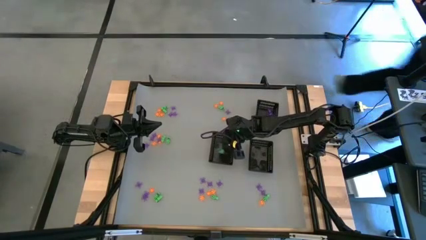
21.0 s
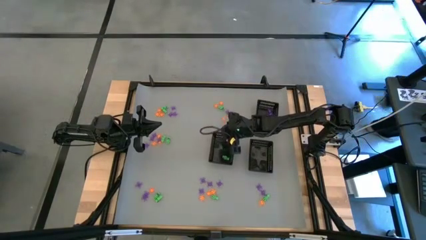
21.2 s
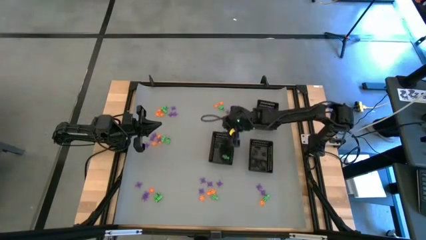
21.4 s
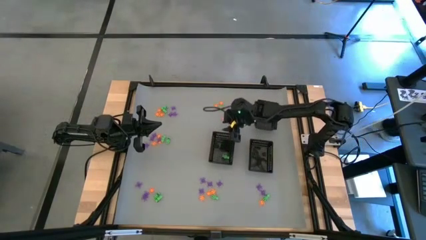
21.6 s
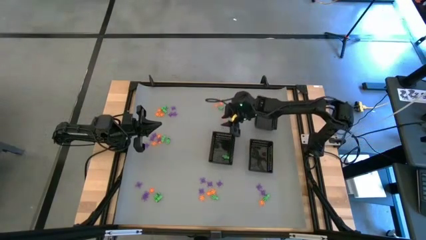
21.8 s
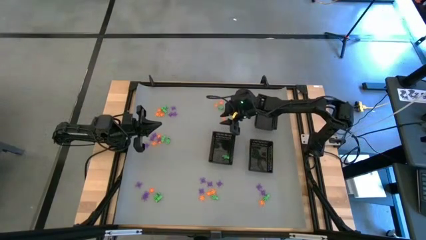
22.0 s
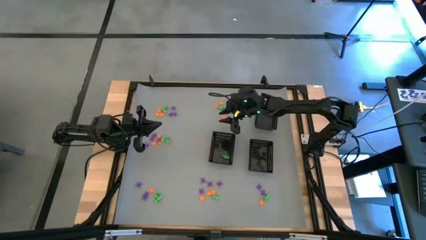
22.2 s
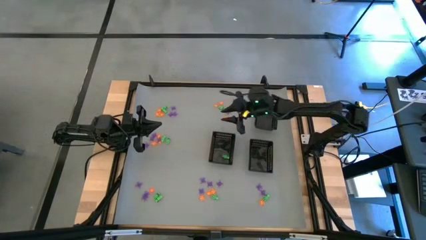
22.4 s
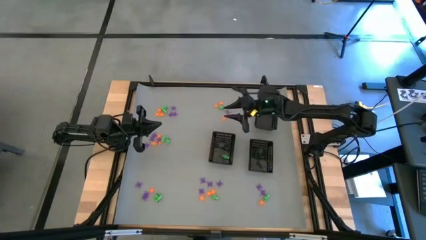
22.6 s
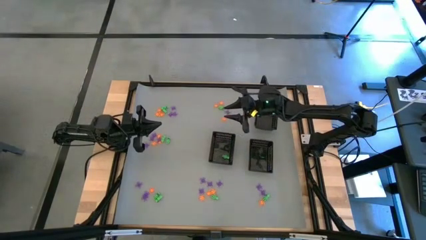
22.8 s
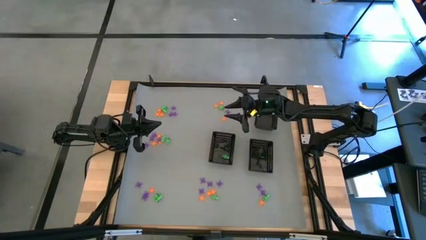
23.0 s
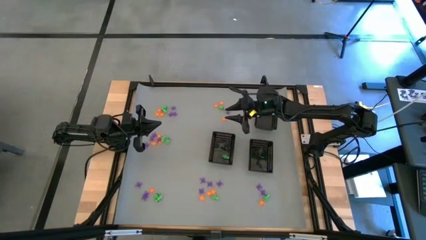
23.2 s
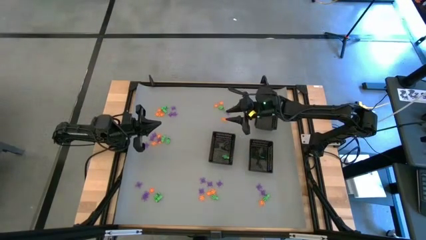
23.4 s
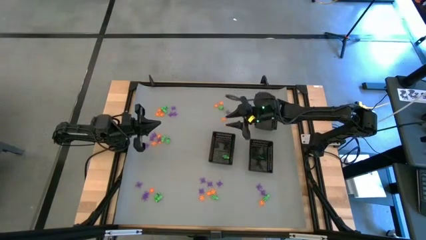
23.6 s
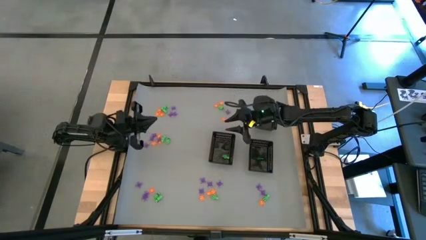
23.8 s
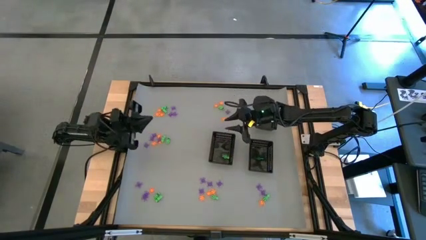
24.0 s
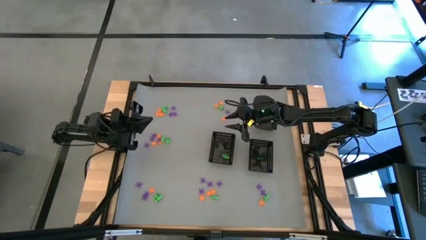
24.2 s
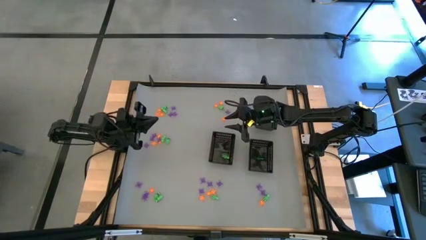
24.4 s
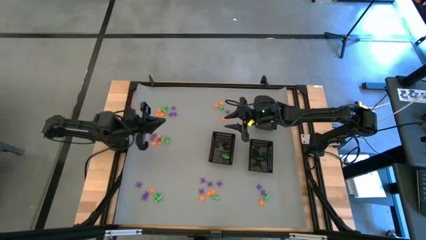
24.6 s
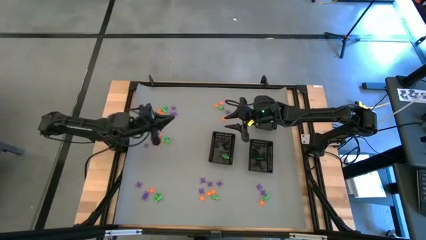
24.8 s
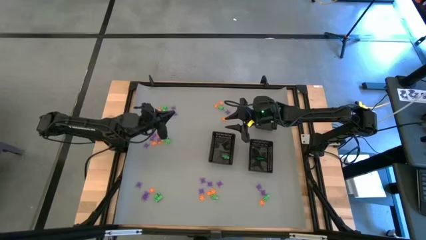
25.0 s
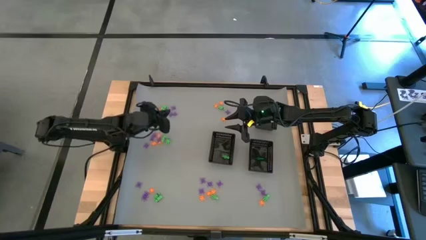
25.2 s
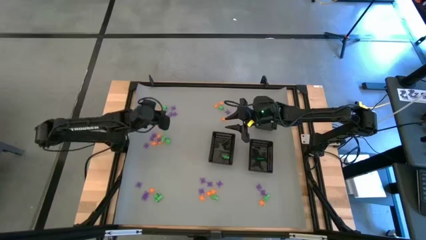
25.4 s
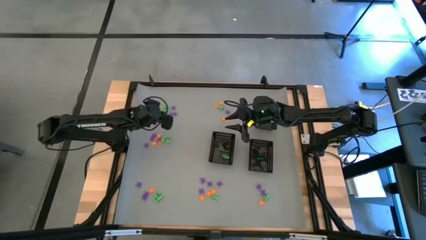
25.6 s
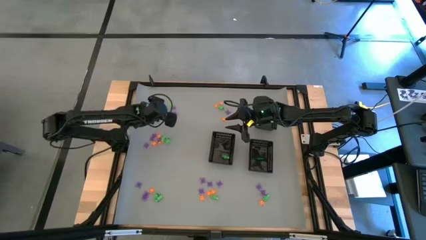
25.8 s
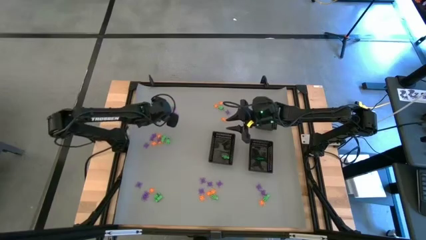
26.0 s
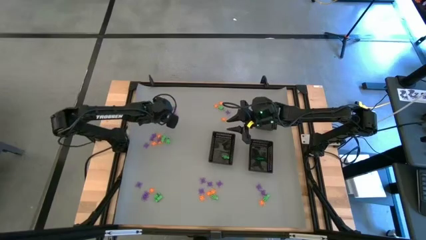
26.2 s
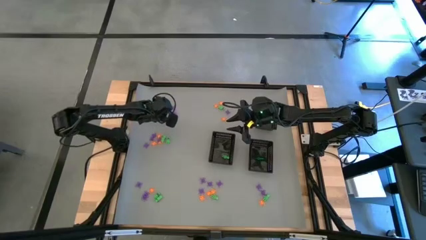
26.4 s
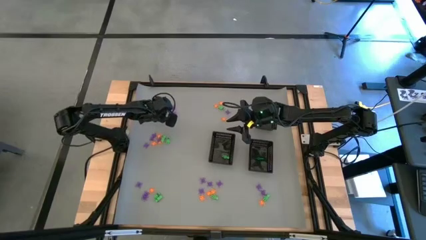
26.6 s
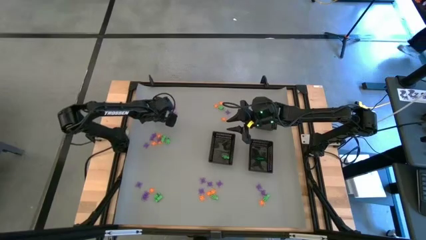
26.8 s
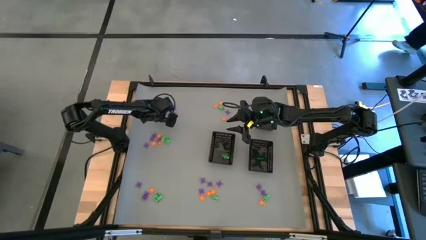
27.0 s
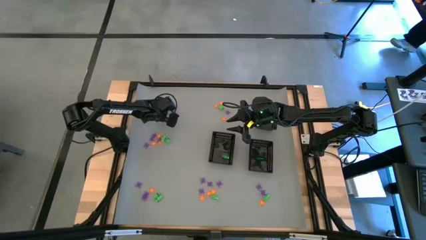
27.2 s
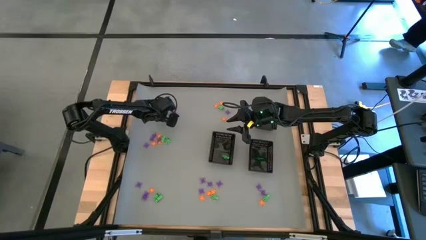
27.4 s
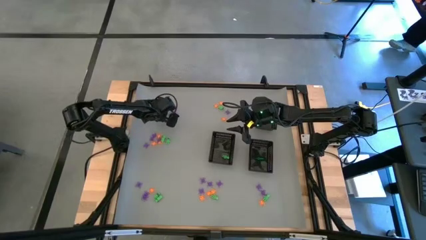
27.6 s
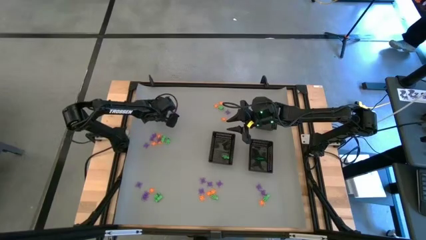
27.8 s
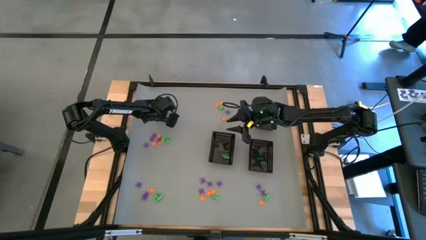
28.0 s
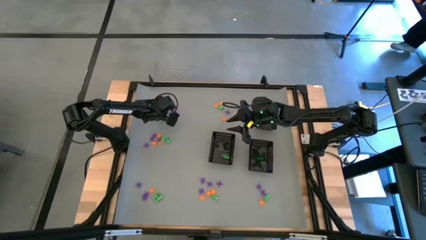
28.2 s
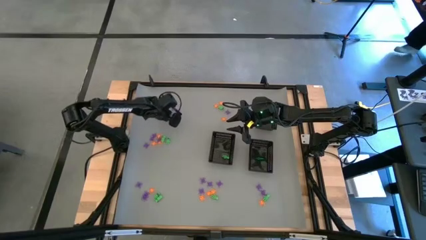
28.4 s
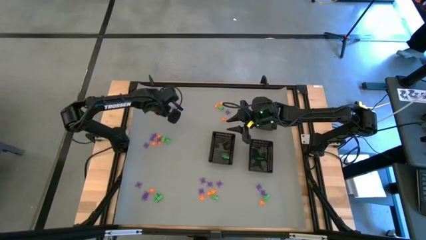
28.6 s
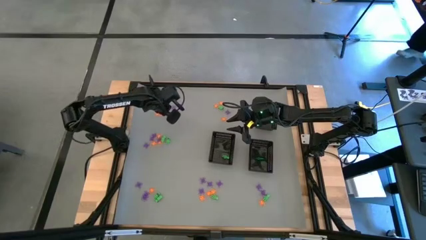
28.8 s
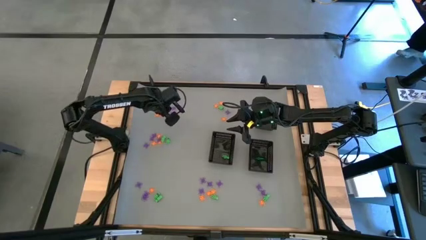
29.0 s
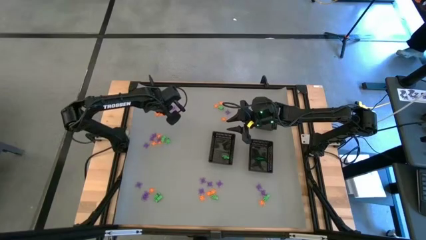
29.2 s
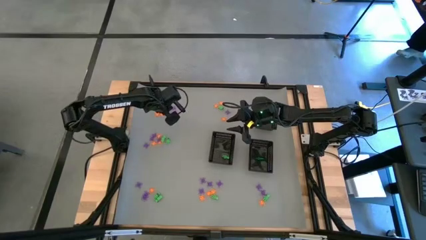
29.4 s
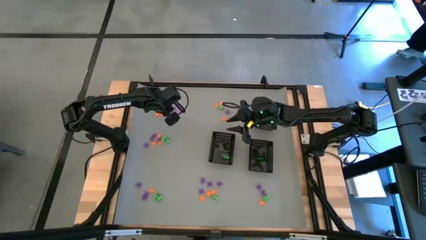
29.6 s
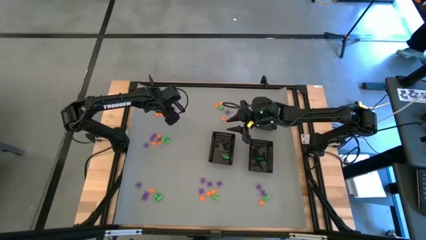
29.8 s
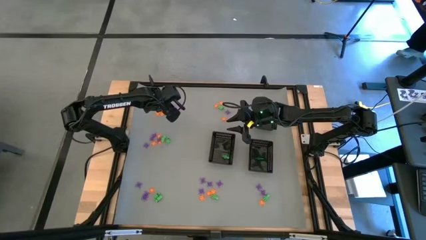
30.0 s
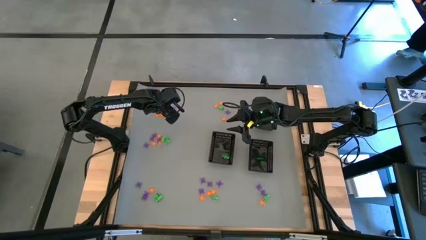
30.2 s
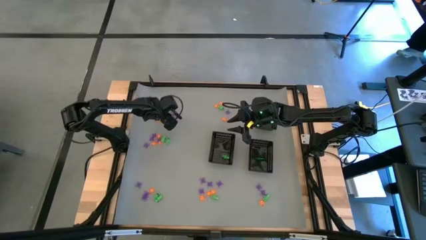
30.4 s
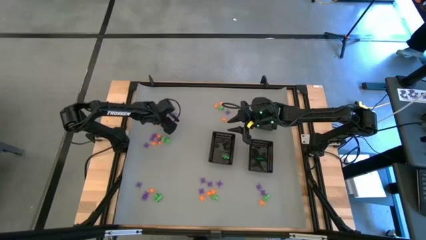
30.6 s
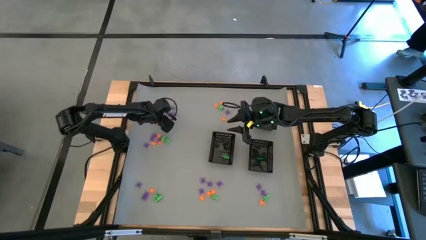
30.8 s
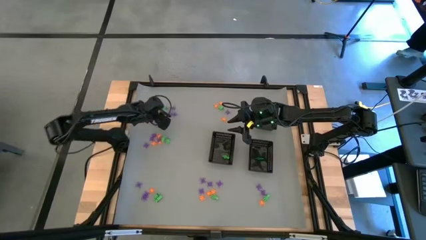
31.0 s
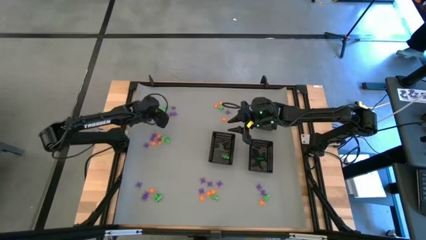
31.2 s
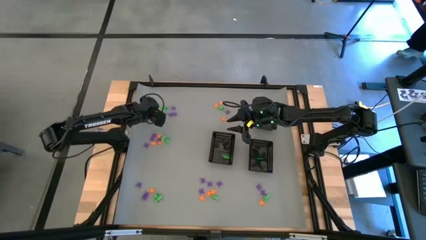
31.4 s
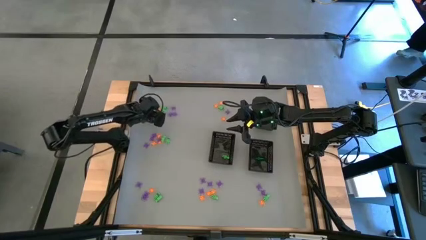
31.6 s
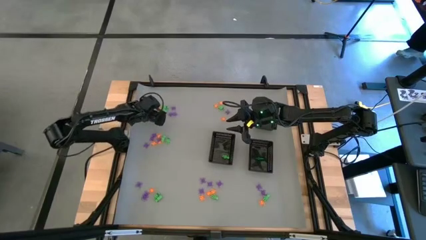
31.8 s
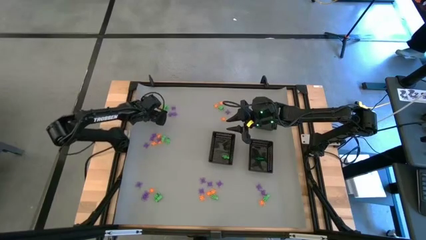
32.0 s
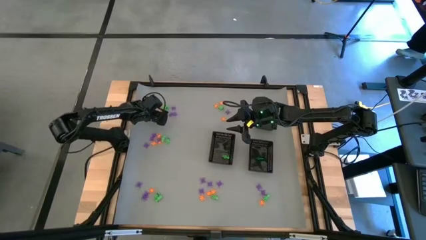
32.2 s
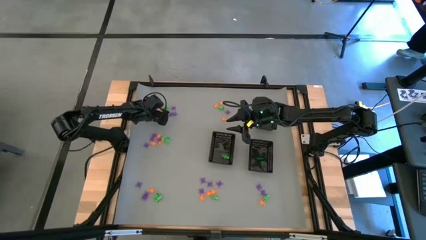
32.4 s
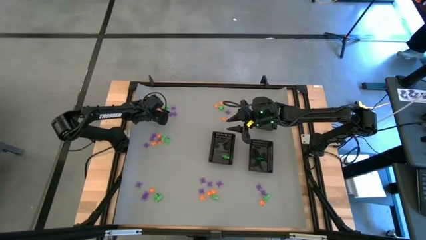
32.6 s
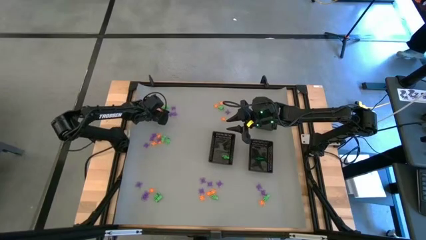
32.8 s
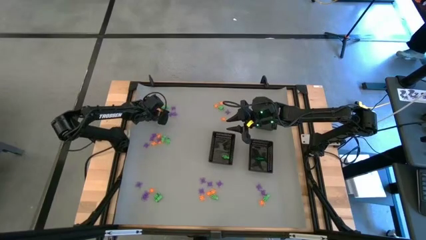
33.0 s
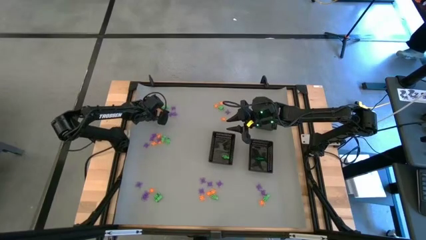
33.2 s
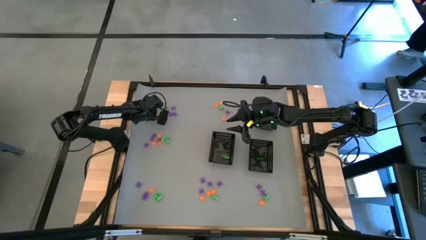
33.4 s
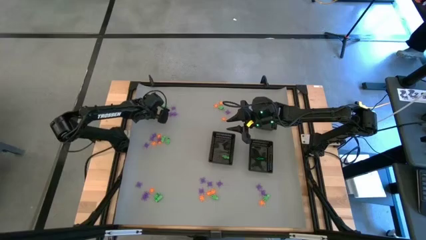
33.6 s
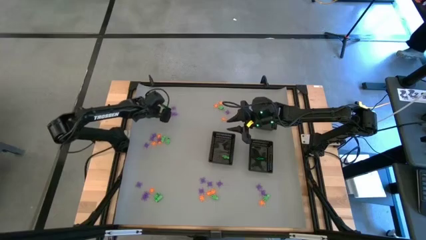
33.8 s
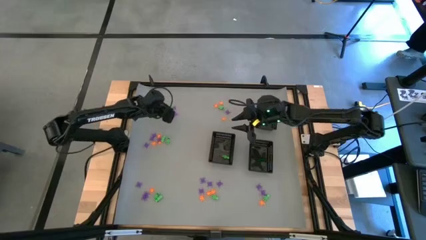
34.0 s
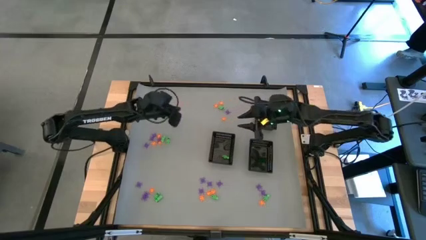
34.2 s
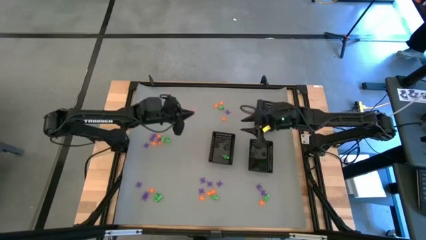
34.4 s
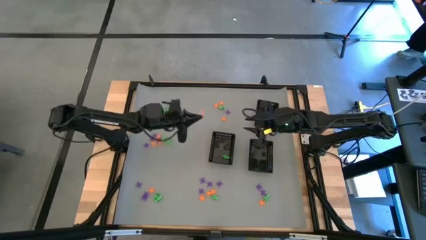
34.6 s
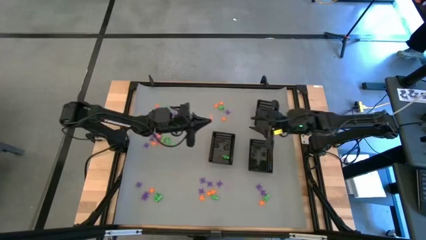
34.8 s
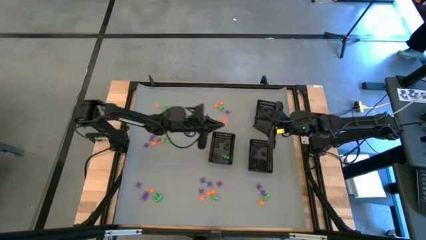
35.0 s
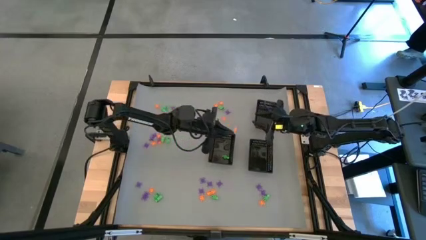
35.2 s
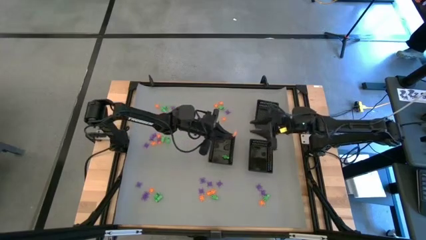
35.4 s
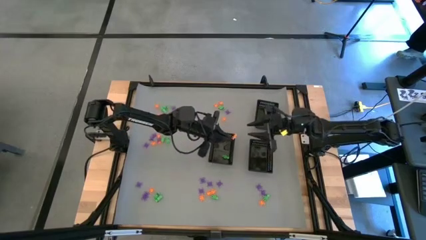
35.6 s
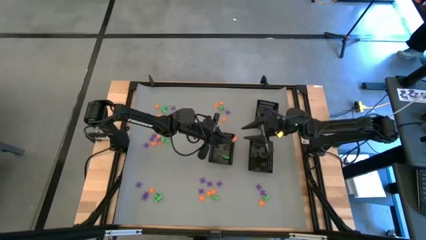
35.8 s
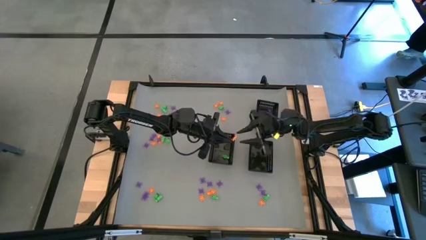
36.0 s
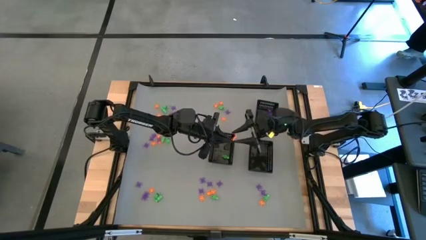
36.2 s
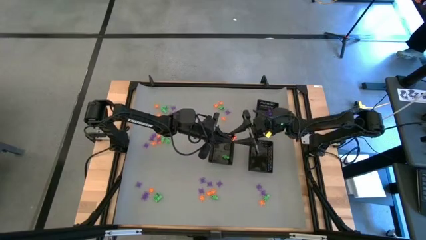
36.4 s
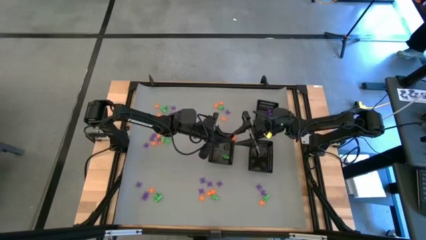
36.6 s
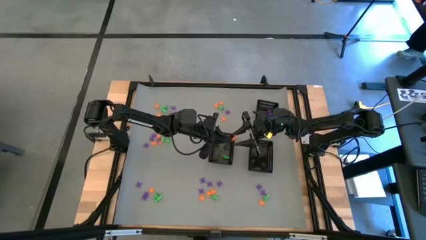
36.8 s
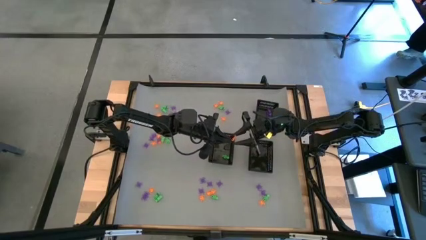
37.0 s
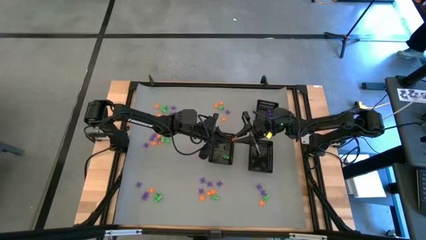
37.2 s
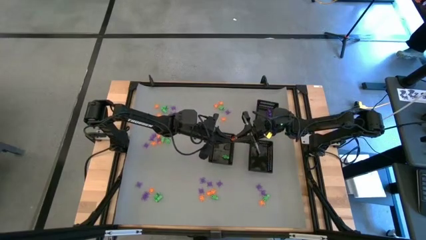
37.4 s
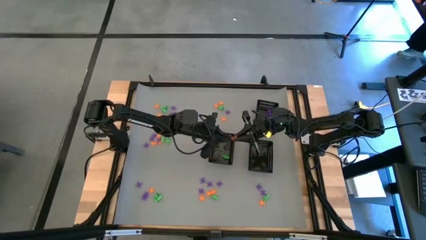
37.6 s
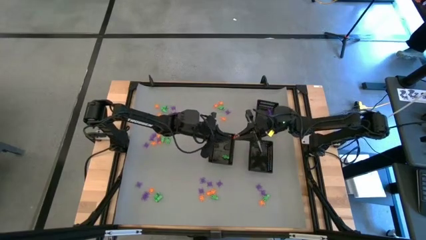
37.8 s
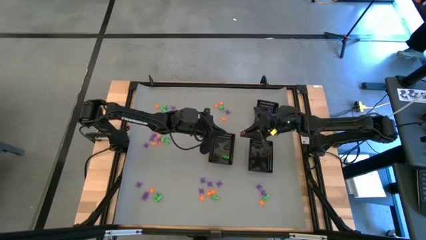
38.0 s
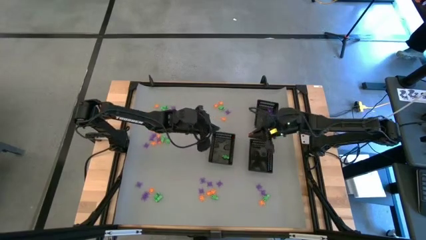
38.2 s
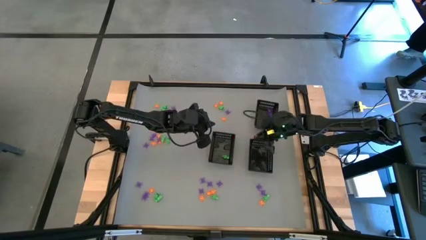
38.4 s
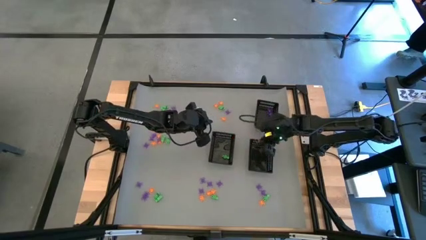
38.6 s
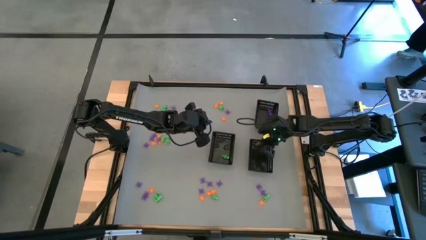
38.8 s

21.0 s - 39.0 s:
Task: Sort Halloween decoration
Put the orange spider toy into the bottom right bin
